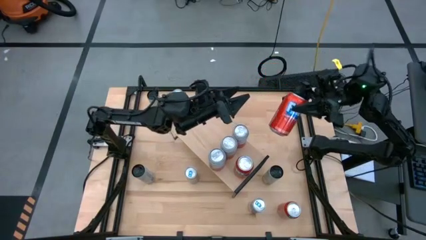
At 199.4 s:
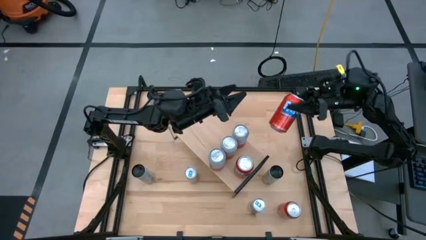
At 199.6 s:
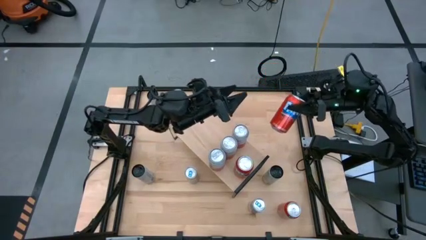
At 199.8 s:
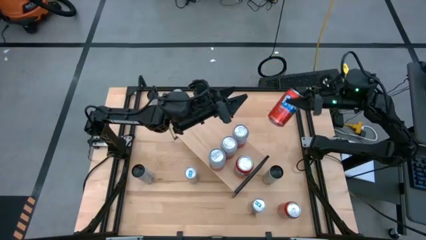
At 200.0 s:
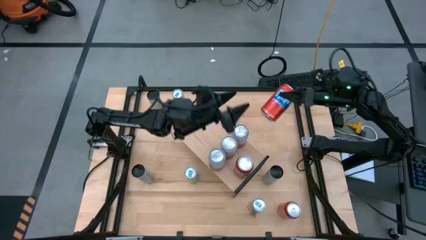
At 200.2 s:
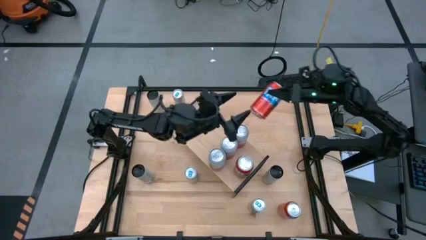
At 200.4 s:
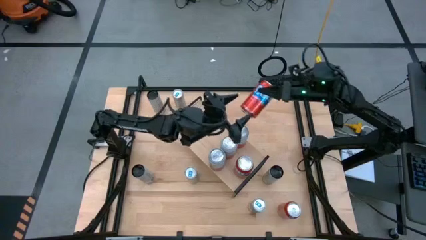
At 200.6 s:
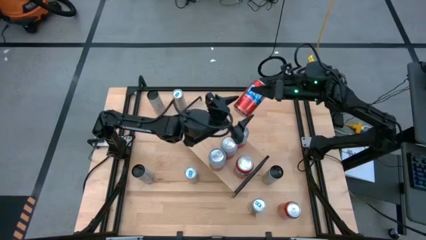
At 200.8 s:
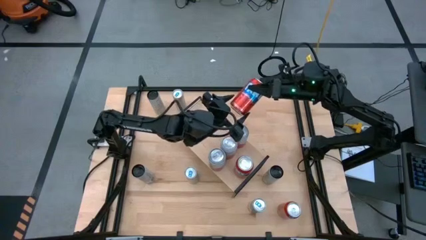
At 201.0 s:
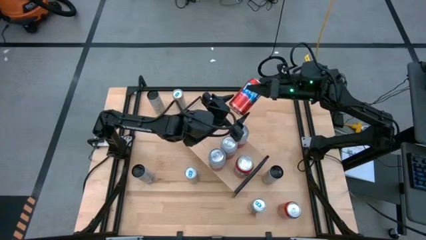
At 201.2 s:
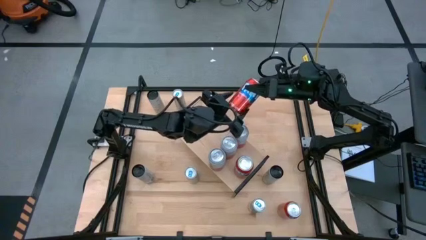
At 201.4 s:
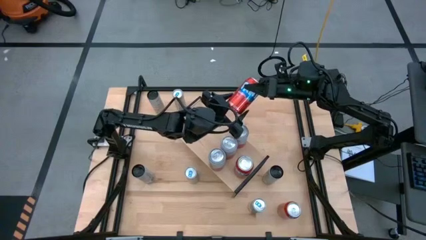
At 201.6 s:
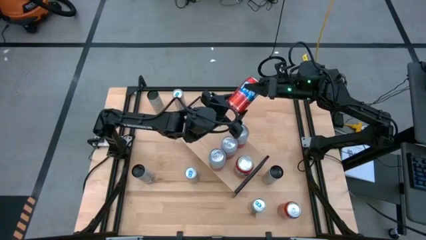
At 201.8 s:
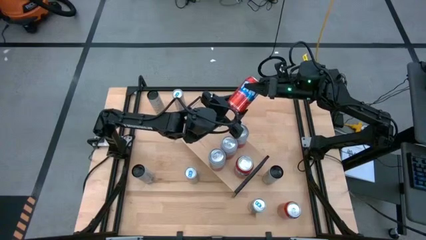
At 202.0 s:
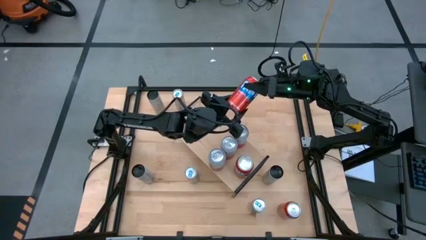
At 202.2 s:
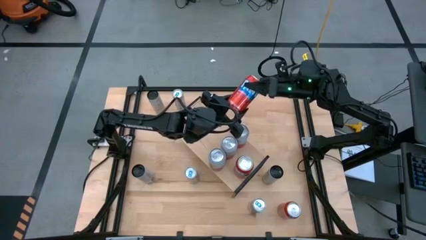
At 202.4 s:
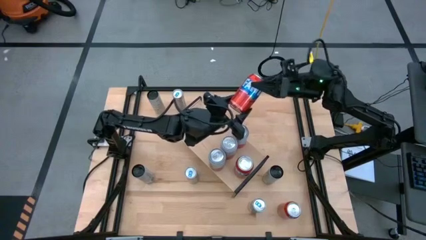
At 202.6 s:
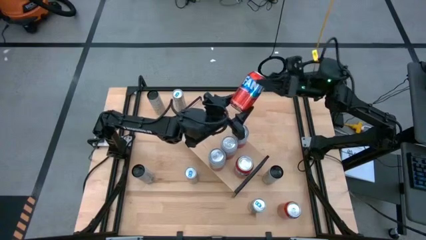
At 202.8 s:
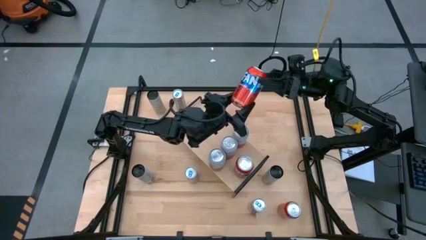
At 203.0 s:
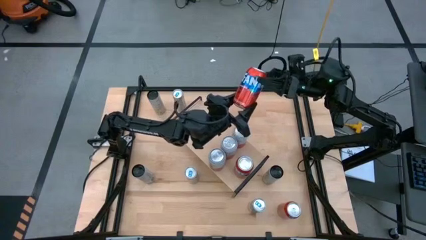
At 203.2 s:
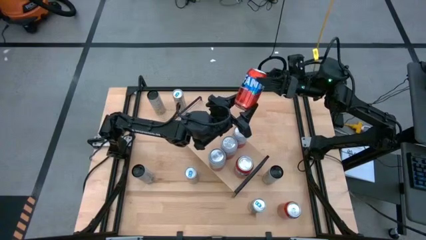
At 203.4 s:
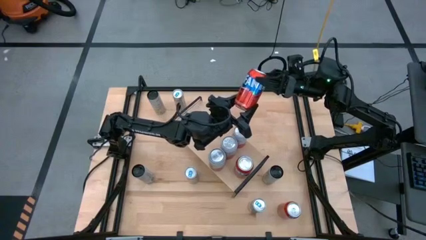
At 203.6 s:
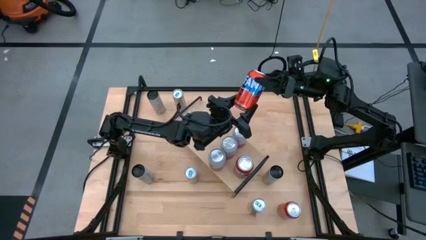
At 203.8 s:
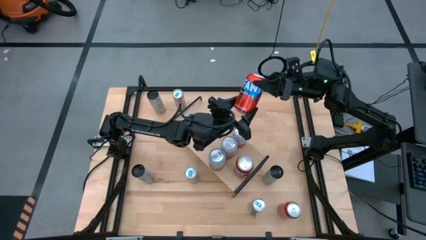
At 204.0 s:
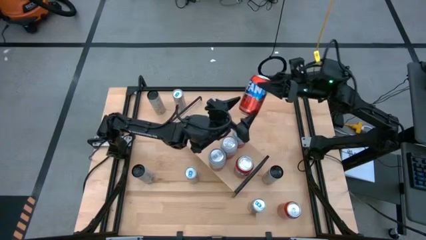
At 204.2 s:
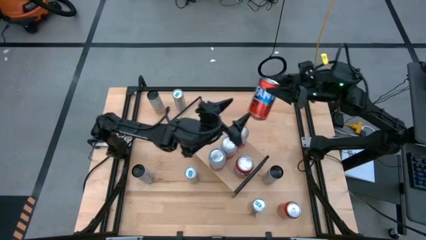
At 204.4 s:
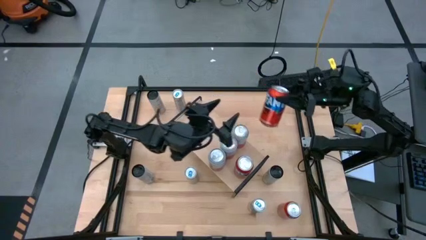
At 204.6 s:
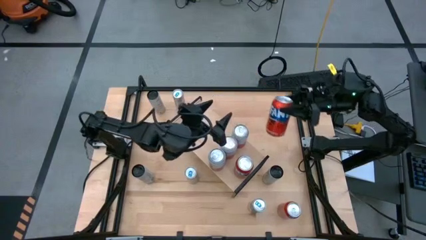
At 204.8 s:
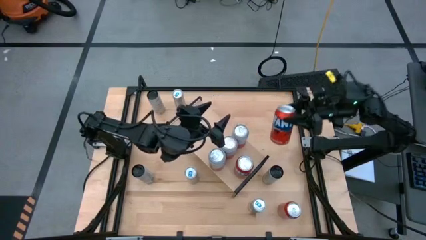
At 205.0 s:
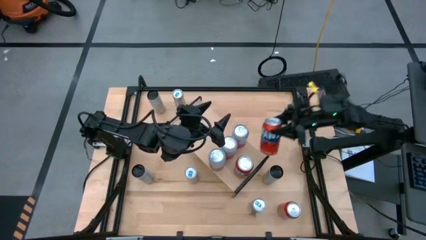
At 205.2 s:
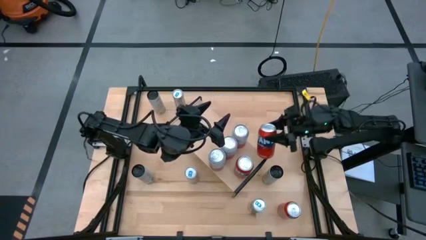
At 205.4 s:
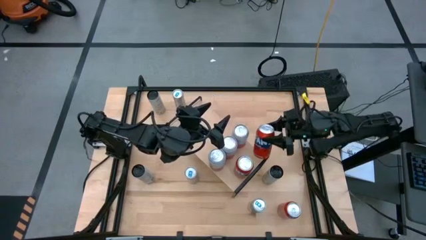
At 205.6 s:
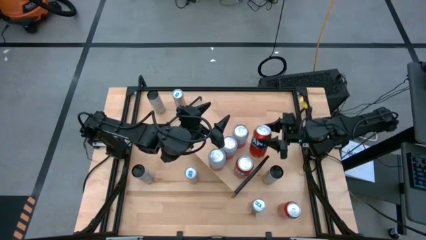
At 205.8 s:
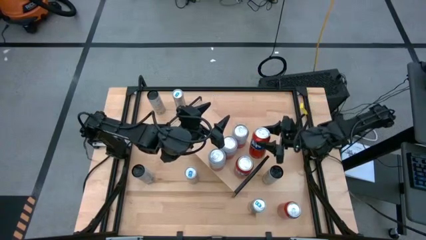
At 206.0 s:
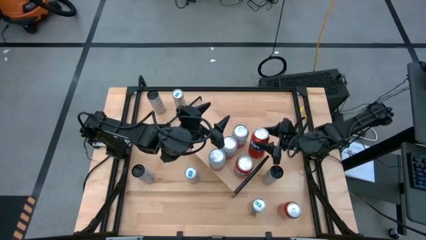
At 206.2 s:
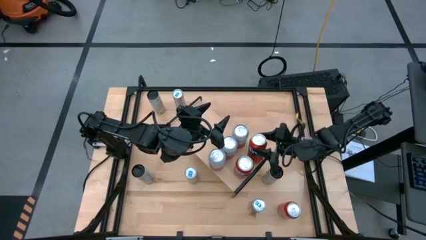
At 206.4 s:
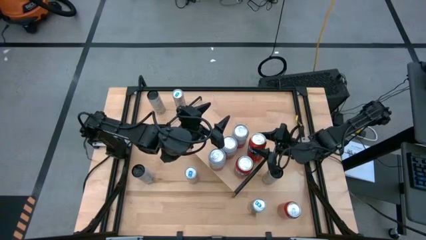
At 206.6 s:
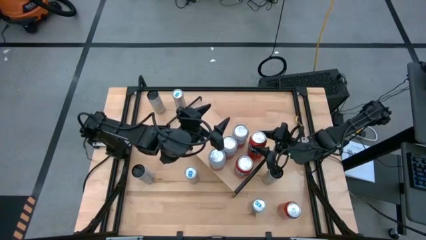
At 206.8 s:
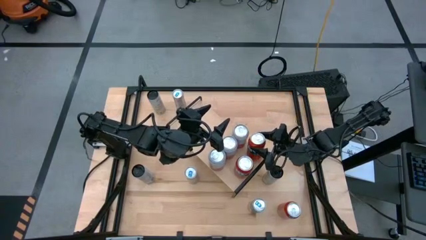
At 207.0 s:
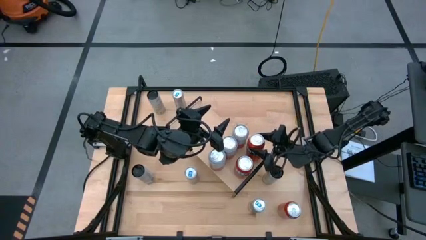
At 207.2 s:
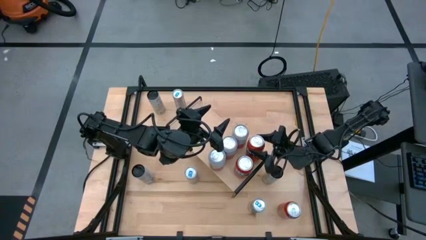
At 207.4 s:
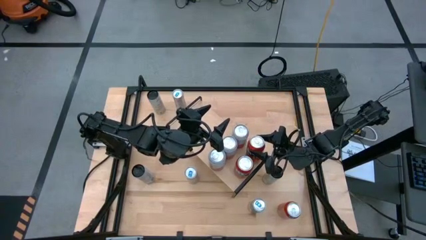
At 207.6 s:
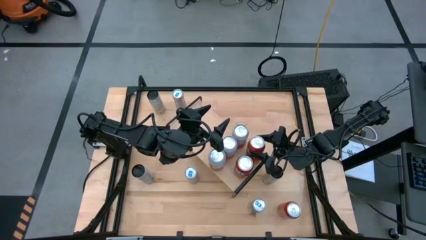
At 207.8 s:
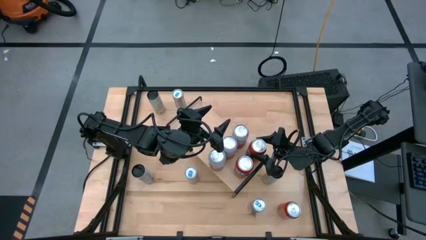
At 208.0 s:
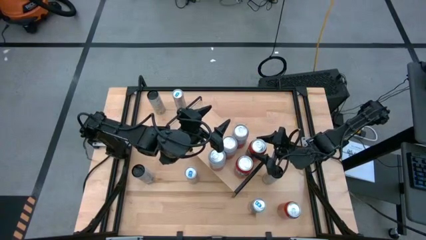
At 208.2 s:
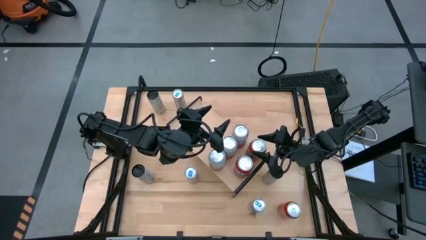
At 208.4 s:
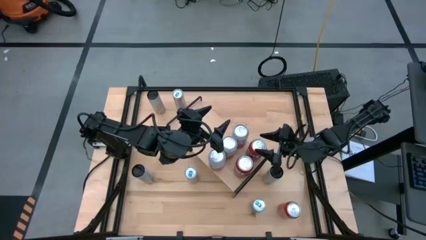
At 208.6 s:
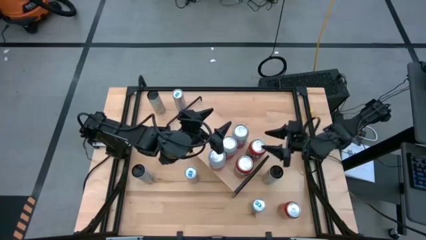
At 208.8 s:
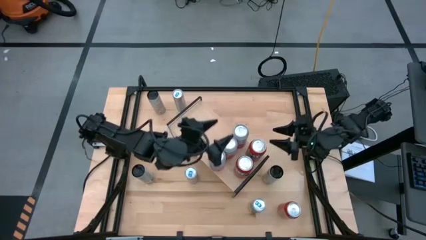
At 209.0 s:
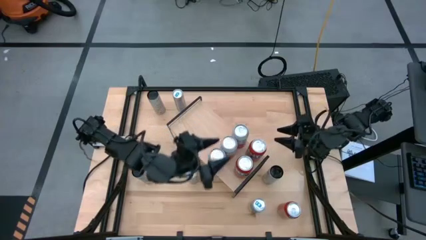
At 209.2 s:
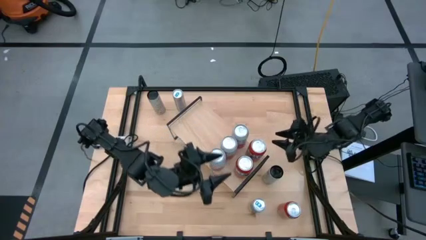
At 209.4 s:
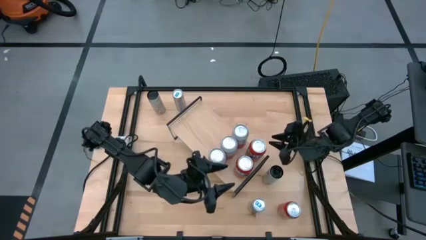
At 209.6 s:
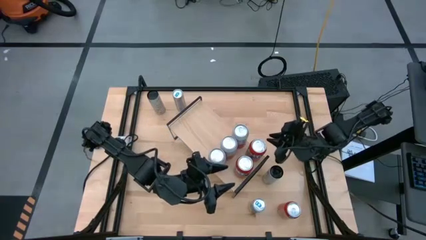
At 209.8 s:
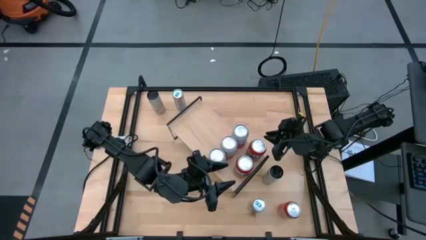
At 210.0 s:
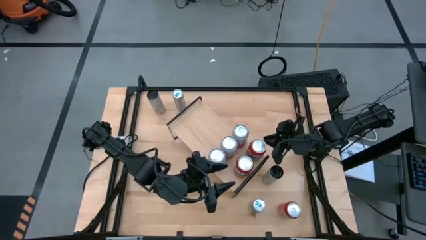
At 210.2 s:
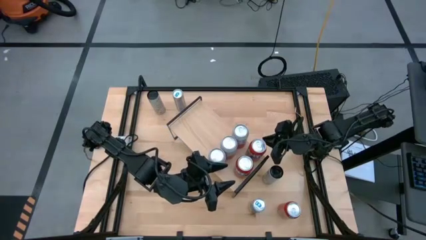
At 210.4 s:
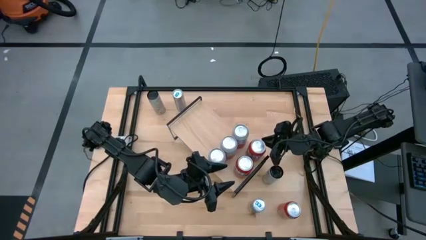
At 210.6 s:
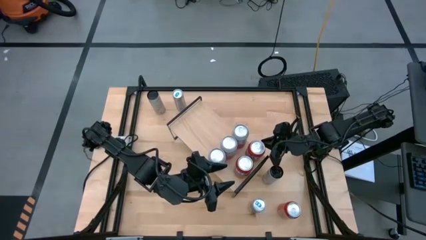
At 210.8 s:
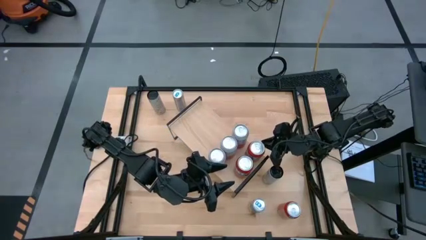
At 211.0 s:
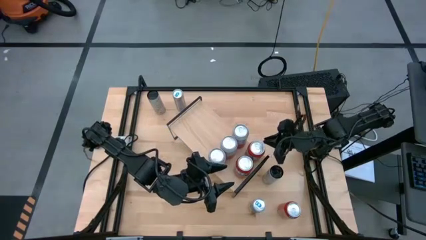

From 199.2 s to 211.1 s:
Task: Place canned beverage on shelf
Put the top red soda can on the shelf aligned with the other red soda can

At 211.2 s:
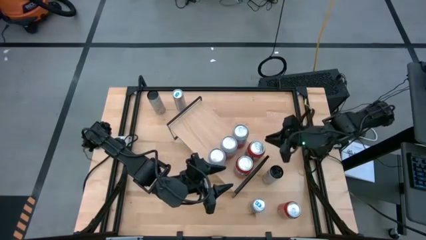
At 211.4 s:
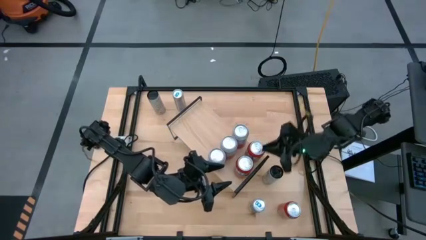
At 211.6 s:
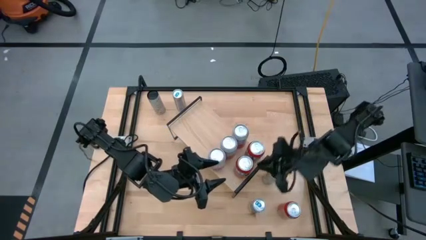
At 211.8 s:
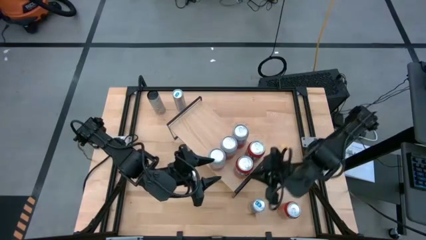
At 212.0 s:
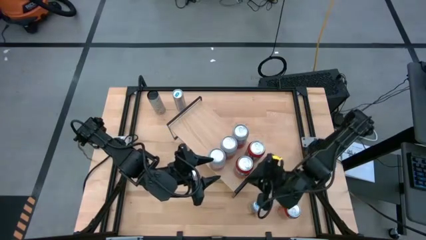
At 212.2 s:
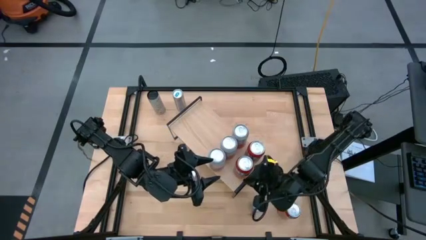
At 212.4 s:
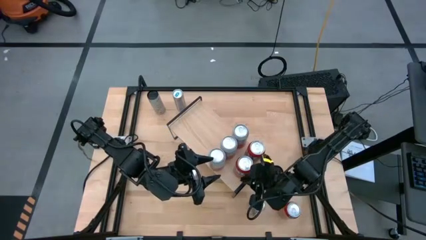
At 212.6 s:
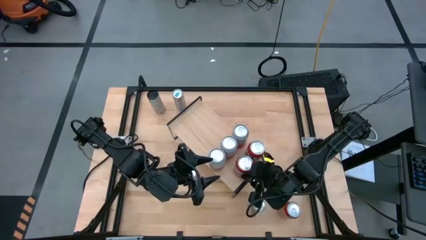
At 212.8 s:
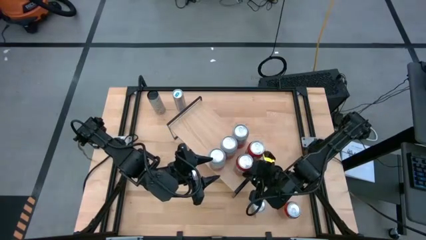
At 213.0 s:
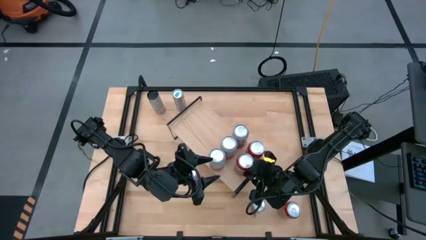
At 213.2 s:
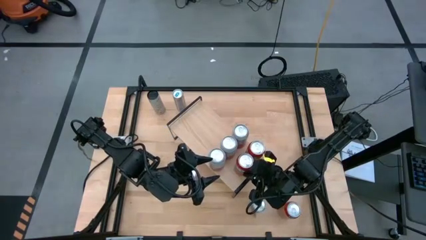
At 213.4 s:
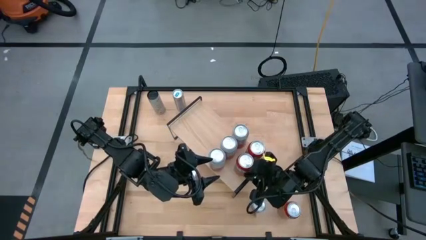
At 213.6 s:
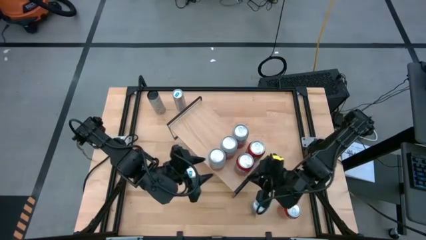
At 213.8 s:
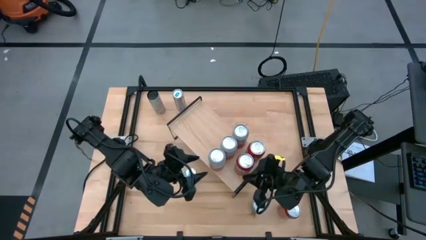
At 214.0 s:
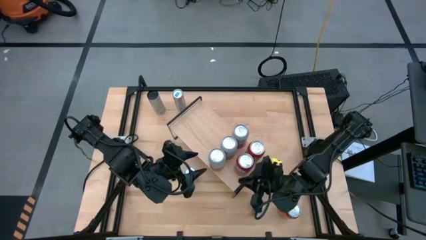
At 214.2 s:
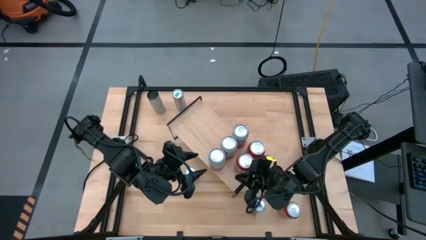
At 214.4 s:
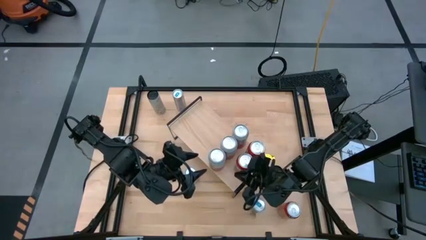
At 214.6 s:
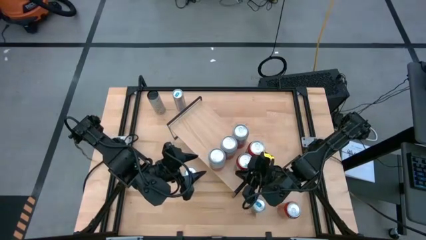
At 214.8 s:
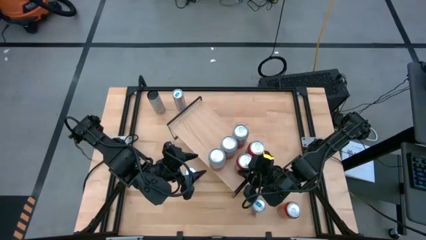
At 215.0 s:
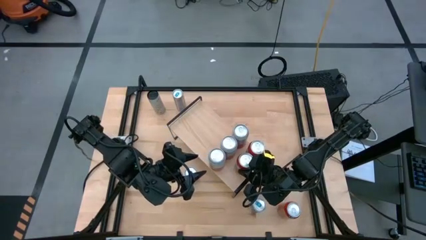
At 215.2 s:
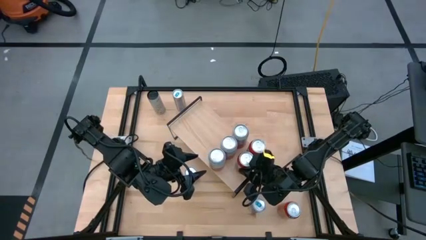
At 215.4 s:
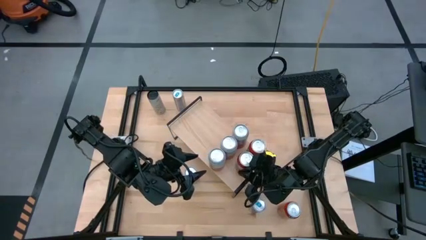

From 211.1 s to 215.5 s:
Adjust the red soda can on the shelf

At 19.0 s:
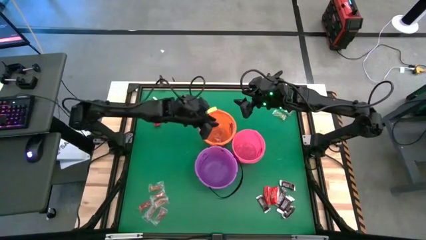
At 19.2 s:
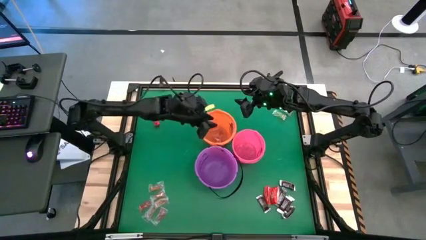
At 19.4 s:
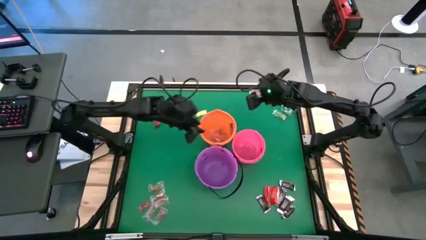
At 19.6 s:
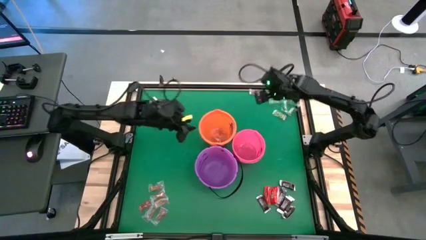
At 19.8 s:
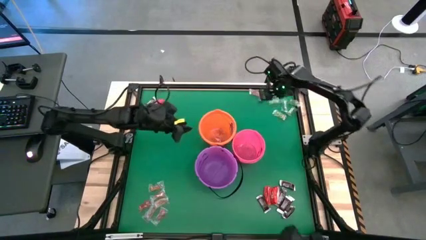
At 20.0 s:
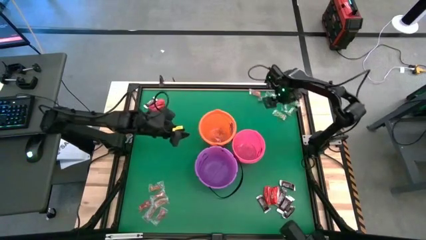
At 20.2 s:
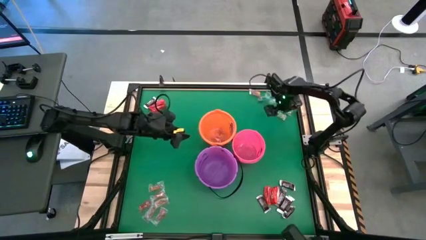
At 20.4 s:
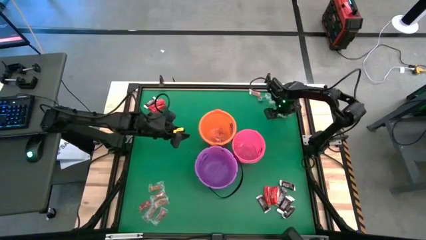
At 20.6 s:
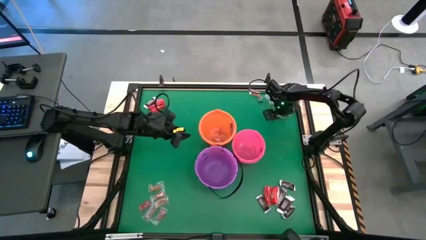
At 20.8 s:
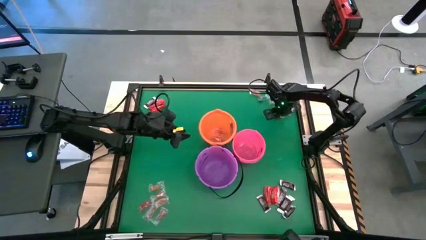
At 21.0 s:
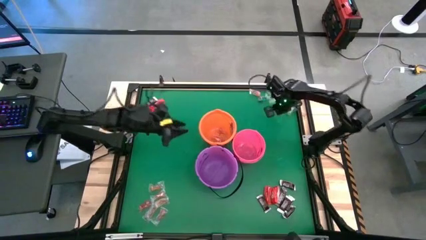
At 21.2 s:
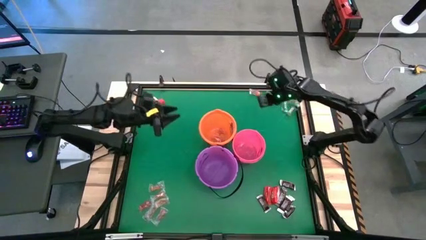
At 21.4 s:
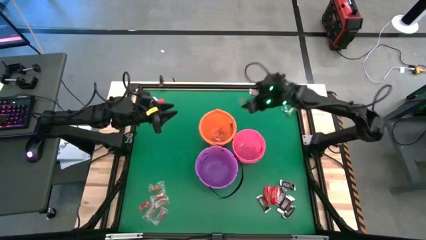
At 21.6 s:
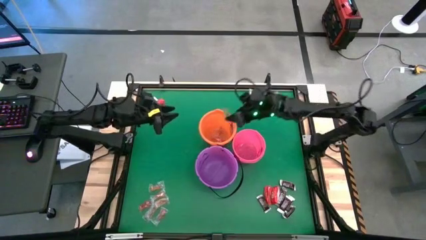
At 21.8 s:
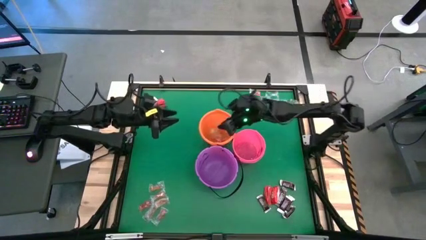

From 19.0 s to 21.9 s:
Task: Sort candy by brand, put in halloween buckets
Put the green gummy into the orange bucket
